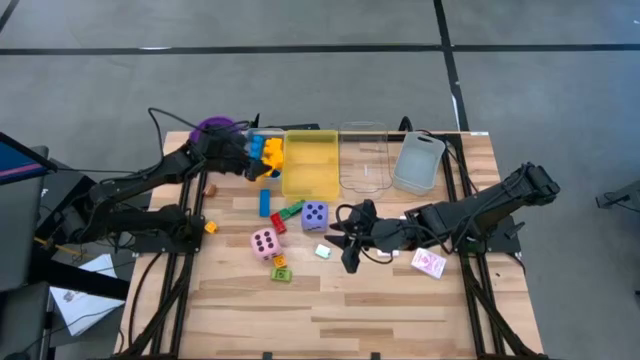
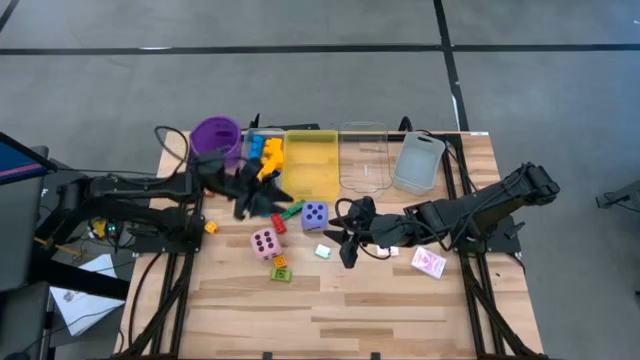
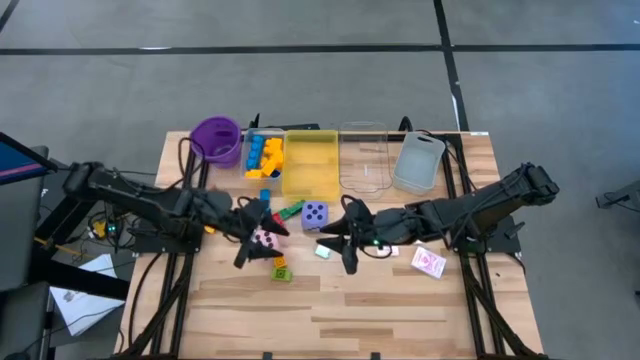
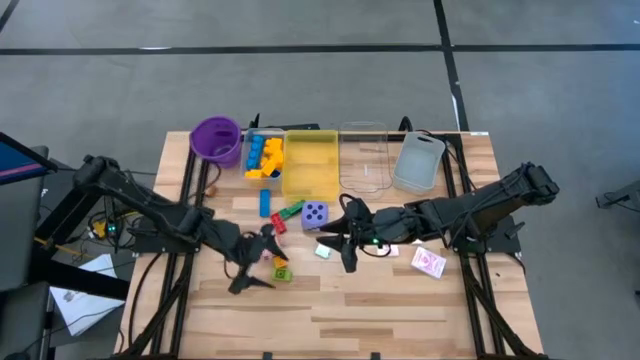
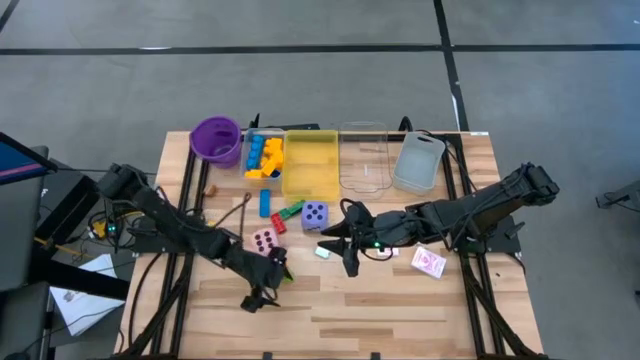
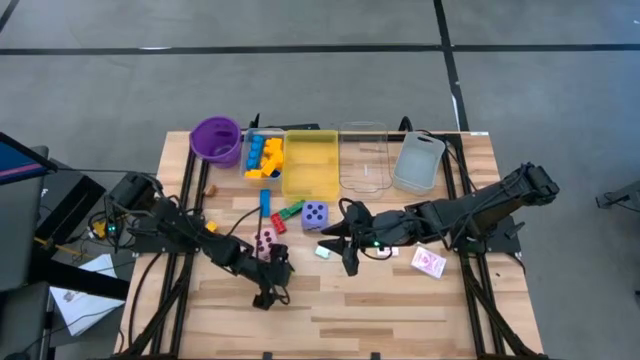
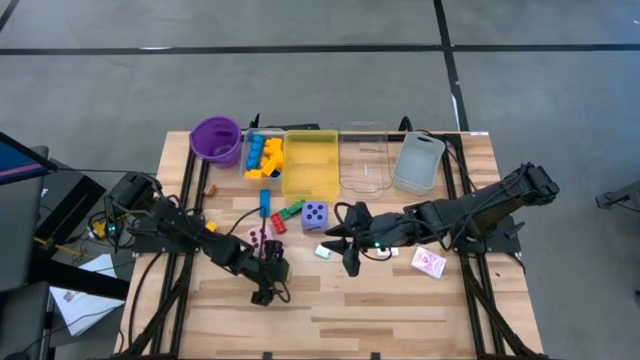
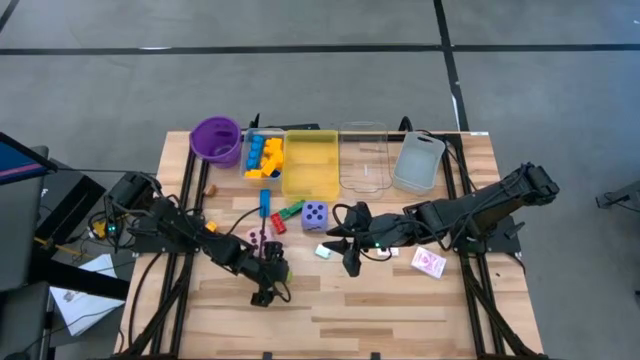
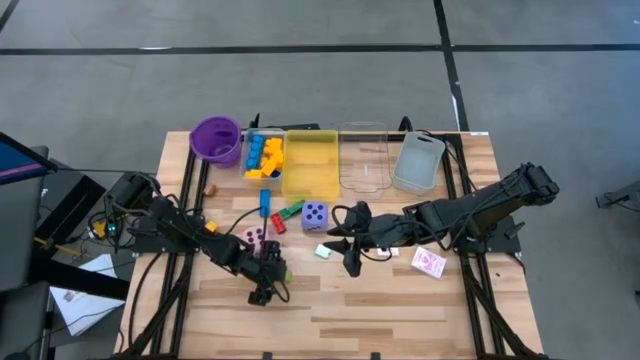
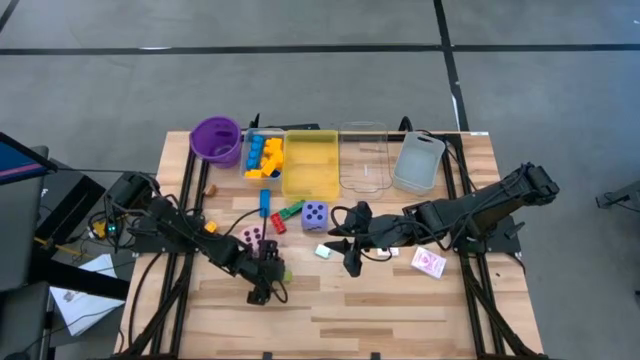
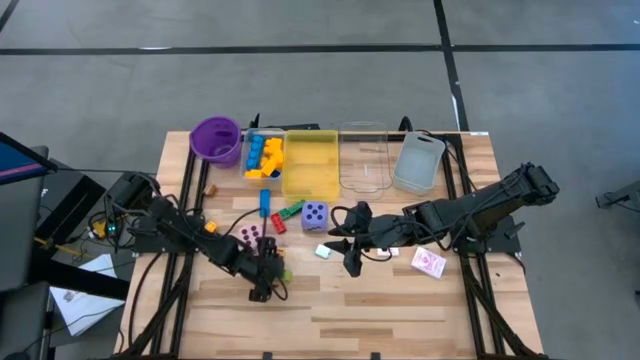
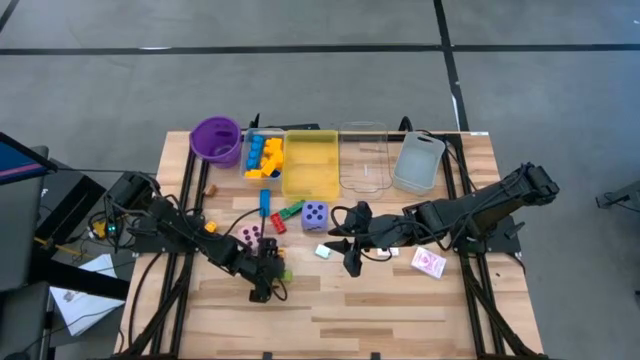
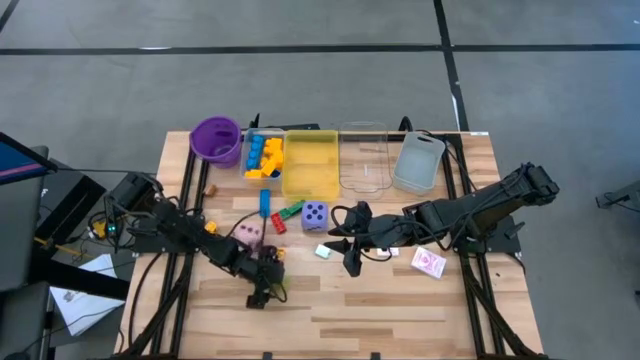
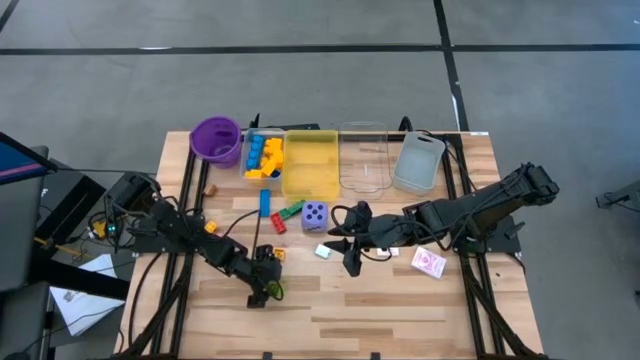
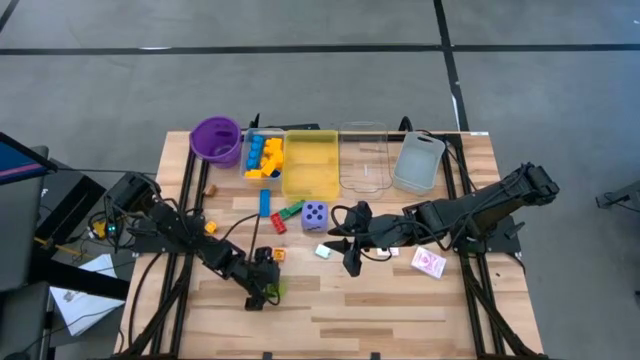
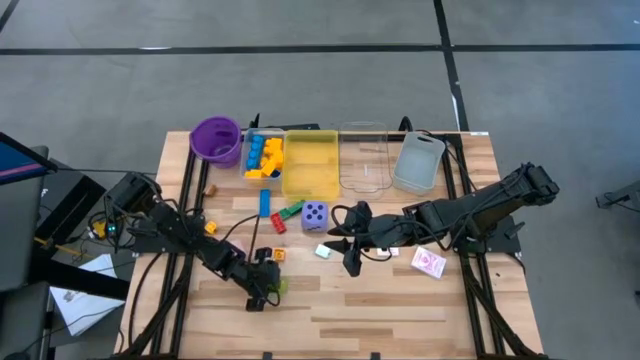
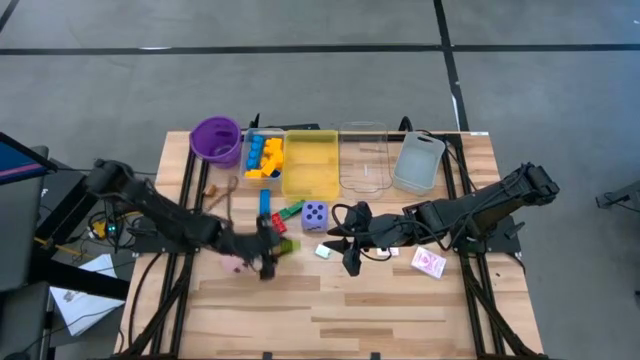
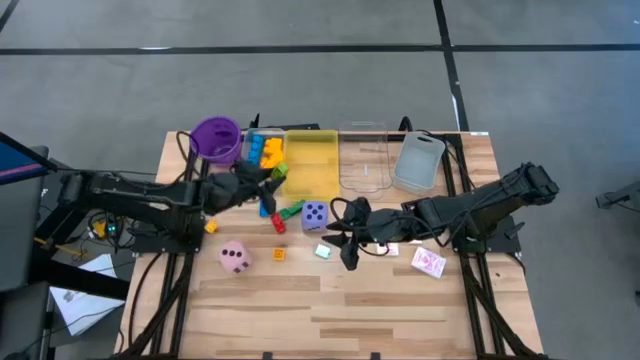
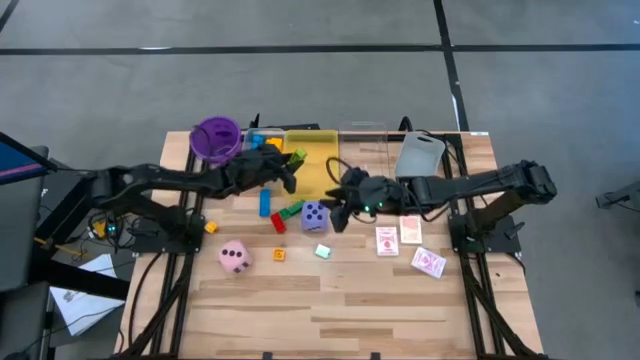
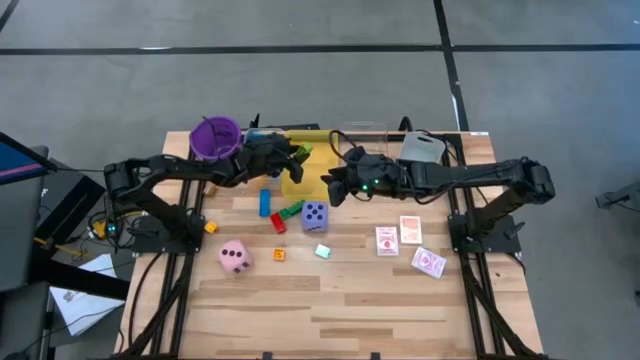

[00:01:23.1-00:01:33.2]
Task: Pick & Place Toys
Put the green one stud game piece into the yellow bin

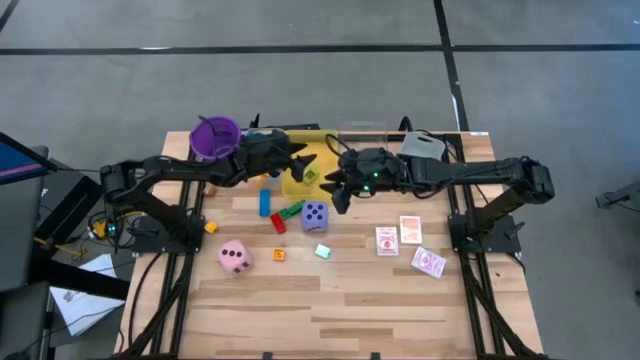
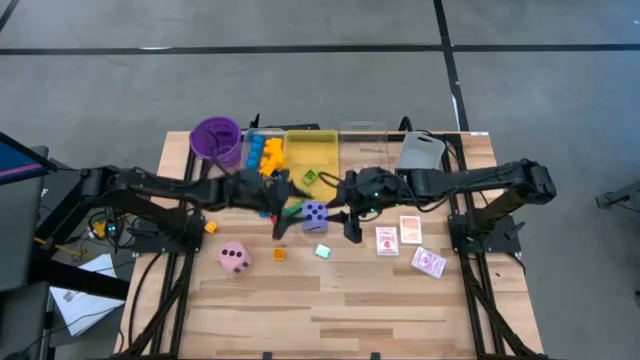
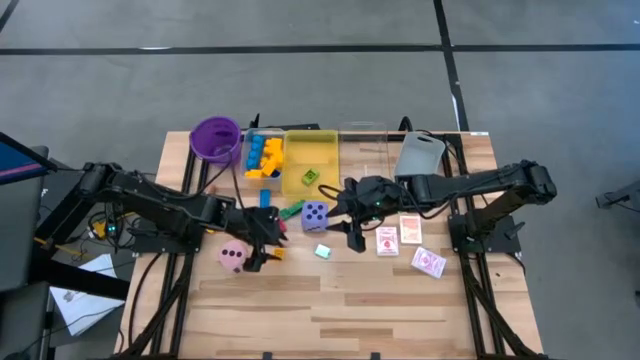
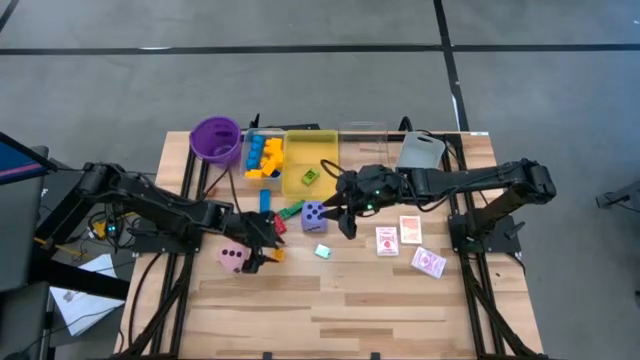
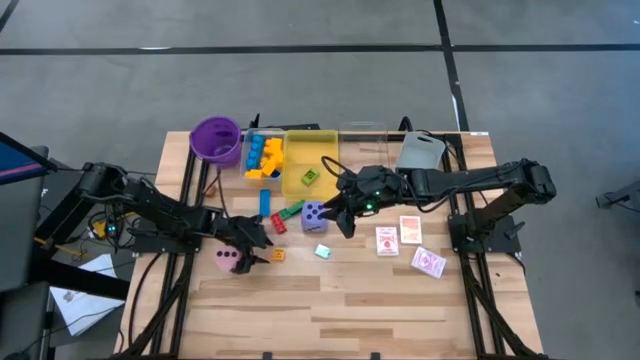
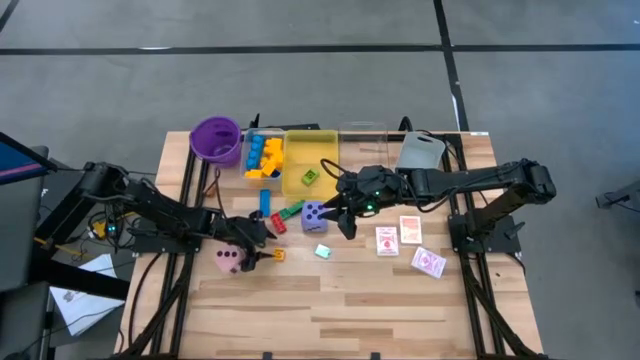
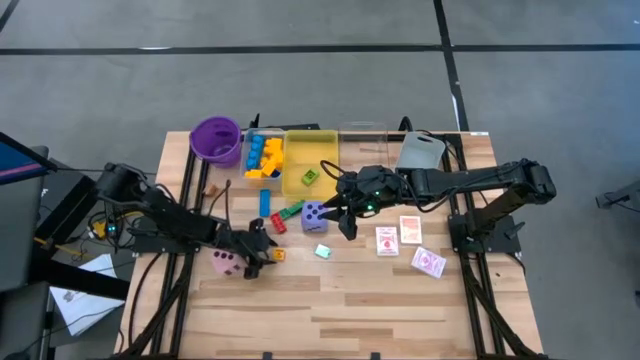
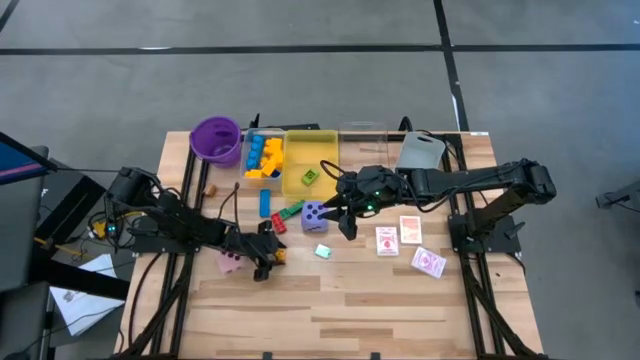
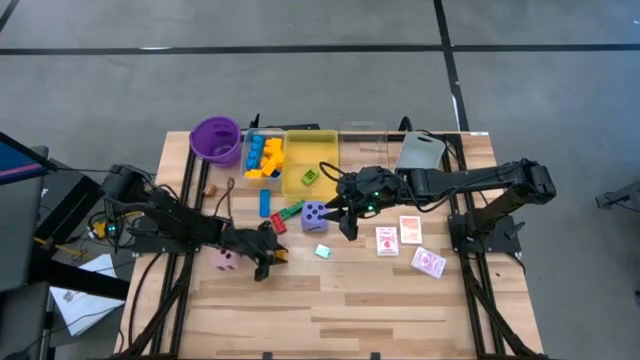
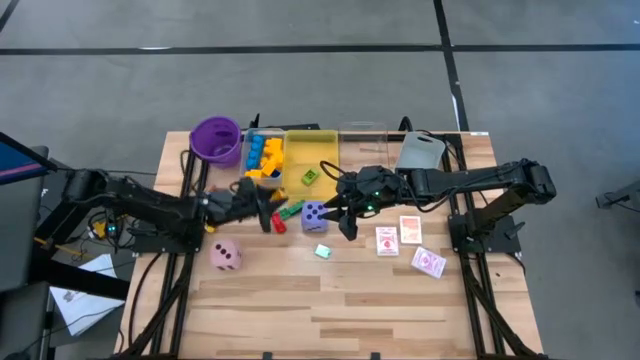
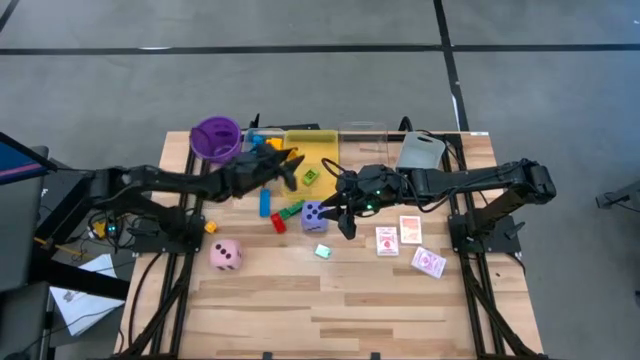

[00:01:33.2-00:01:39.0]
Put the right yellow one stud game piece into the yellow bin

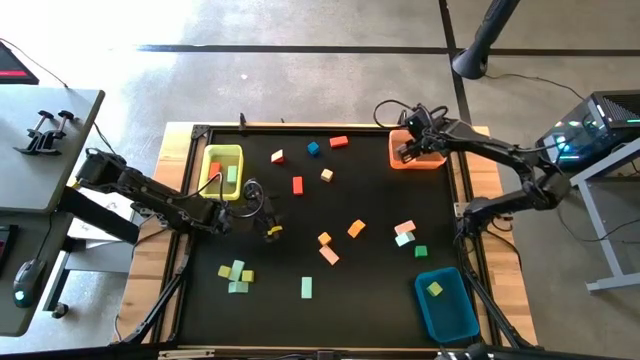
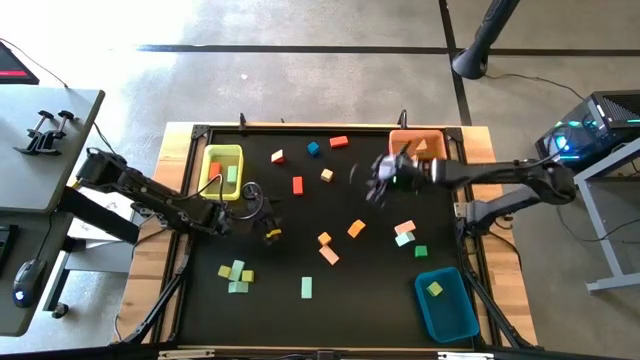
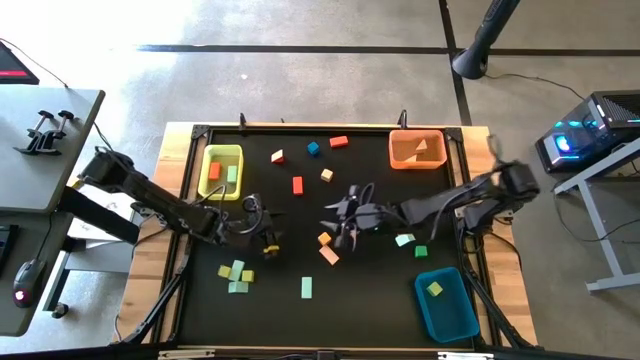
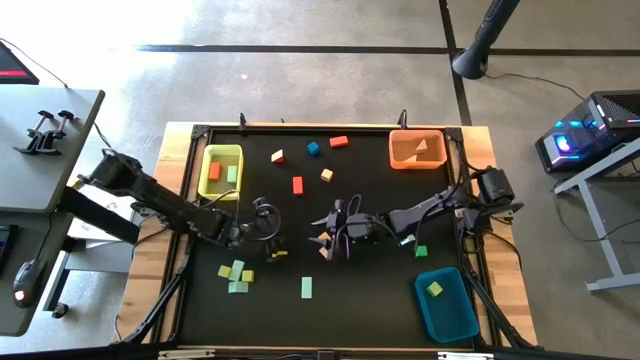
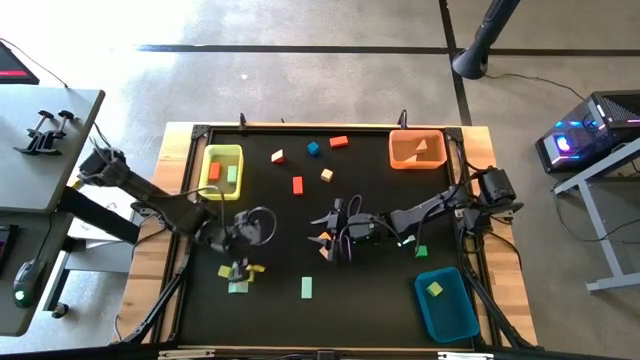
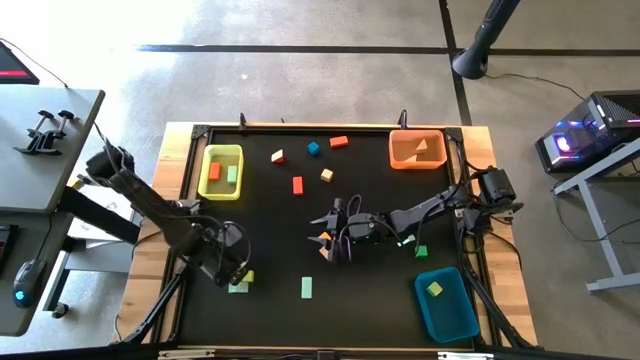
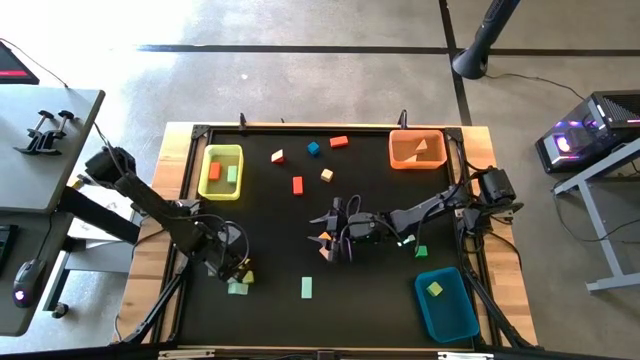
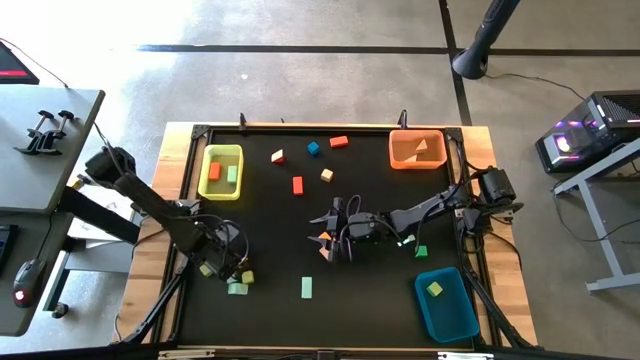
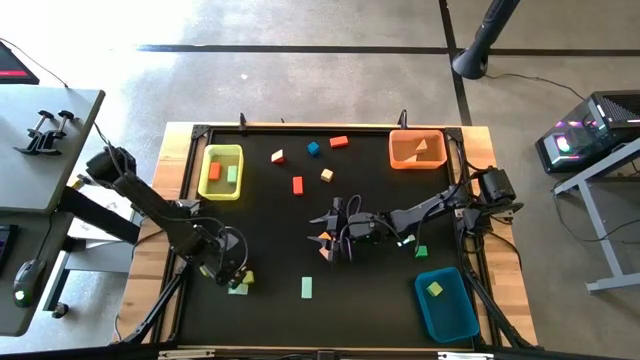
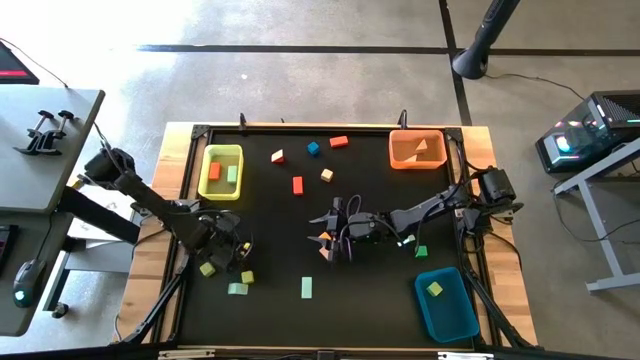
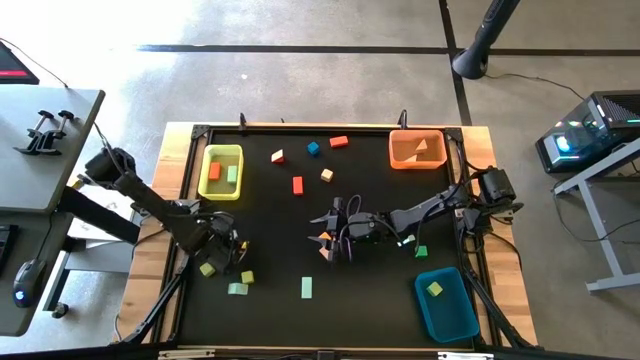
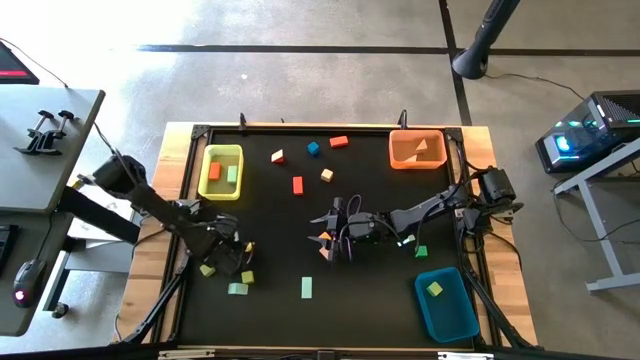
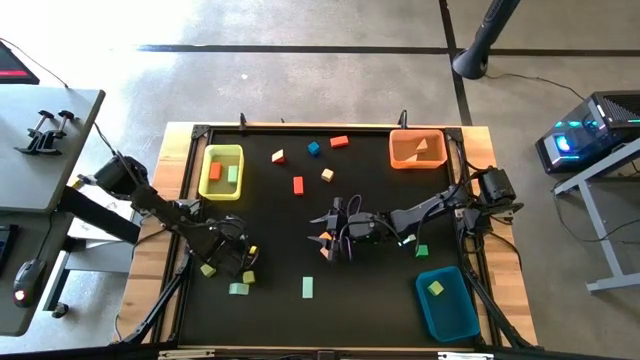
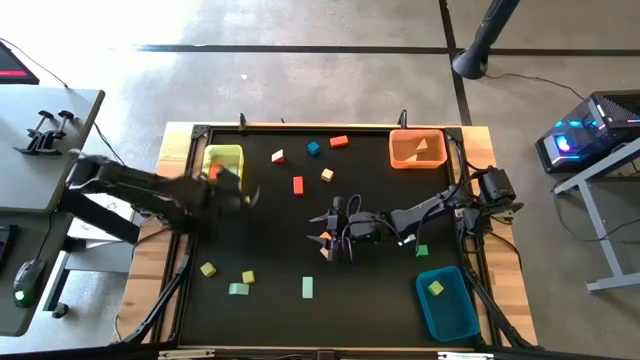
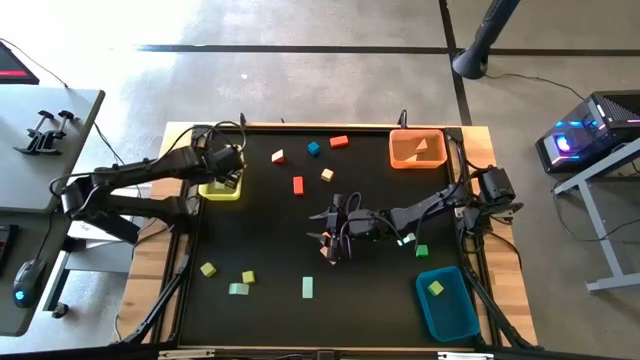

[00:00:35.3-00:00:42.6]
Task: Sort blocks by size
Put the light blue rectangular block into the yellow bin
